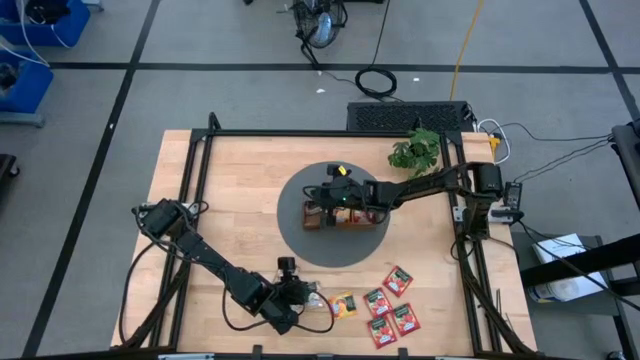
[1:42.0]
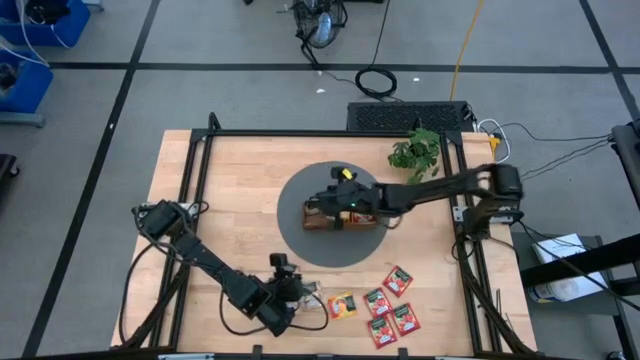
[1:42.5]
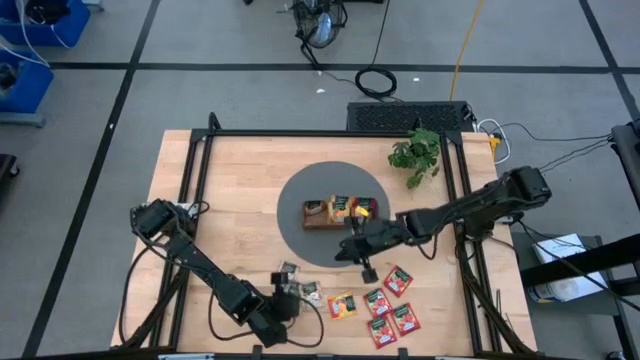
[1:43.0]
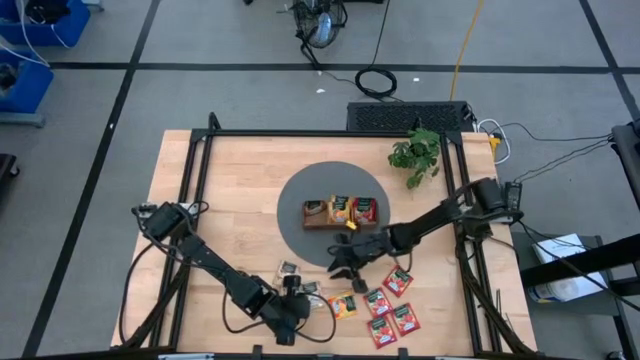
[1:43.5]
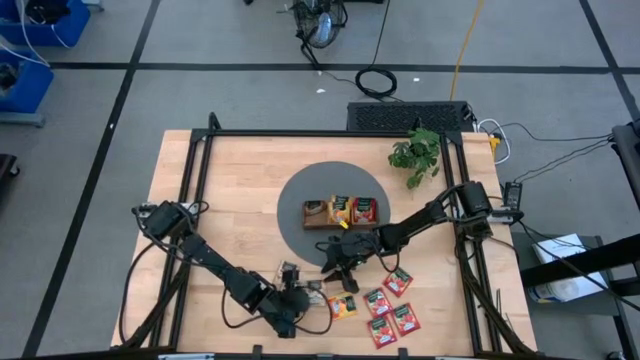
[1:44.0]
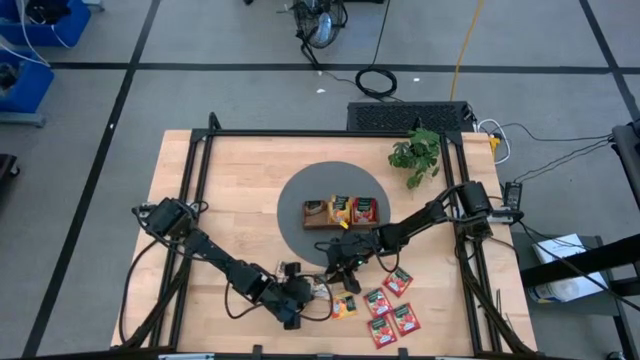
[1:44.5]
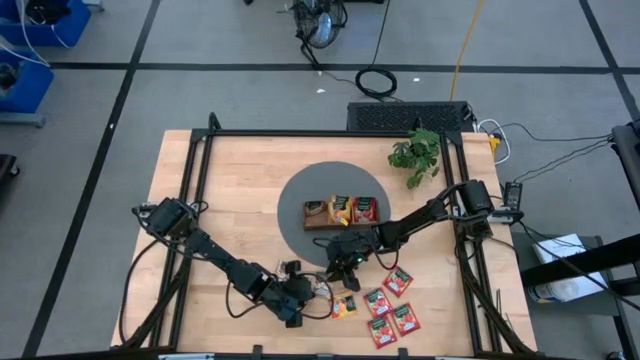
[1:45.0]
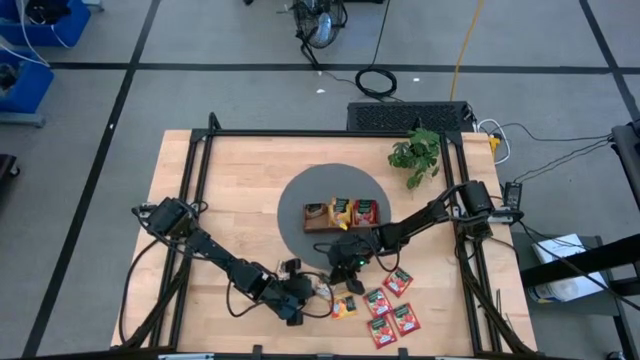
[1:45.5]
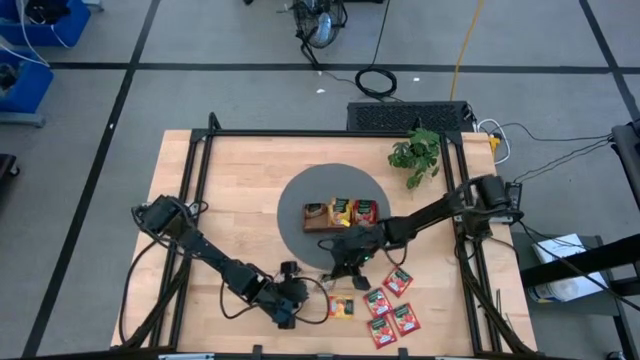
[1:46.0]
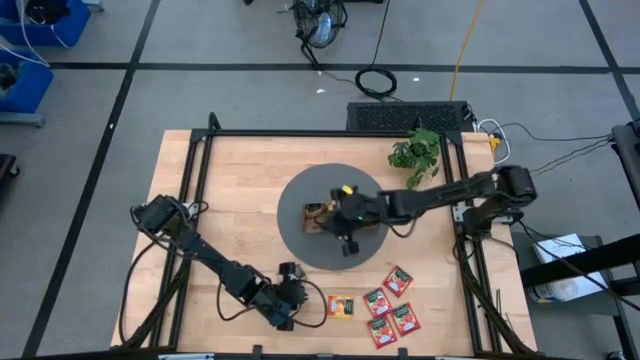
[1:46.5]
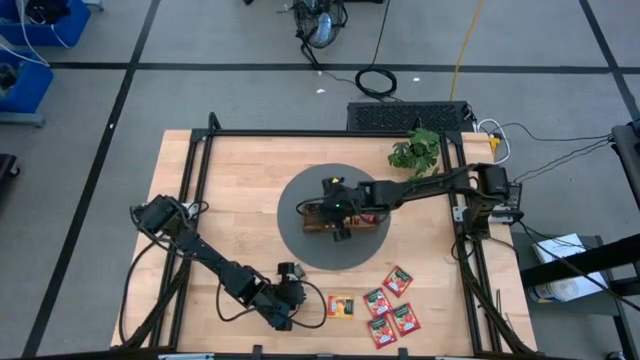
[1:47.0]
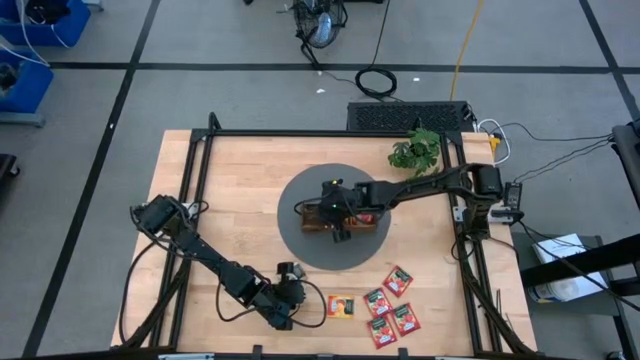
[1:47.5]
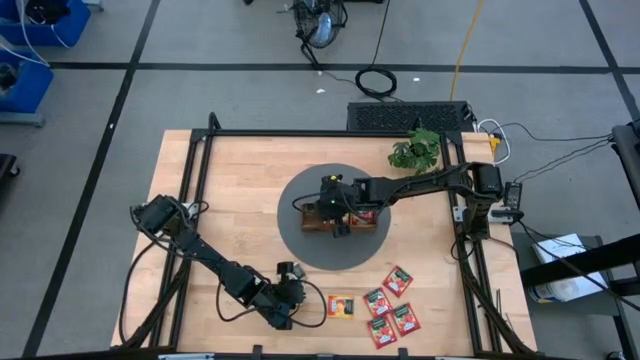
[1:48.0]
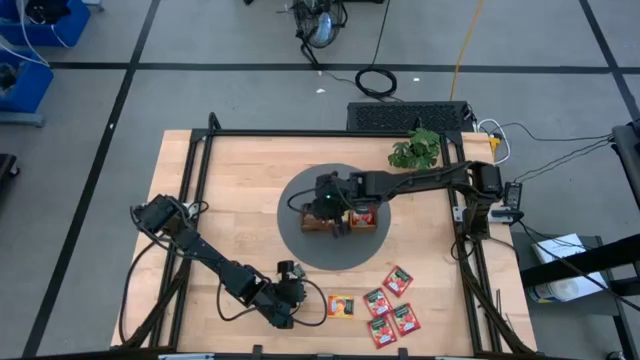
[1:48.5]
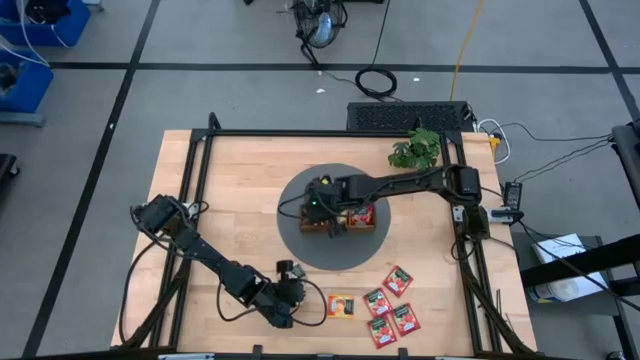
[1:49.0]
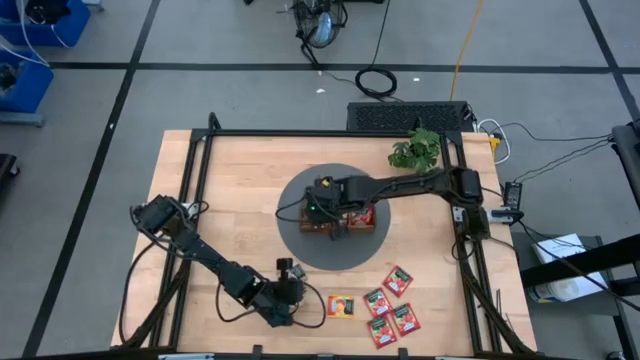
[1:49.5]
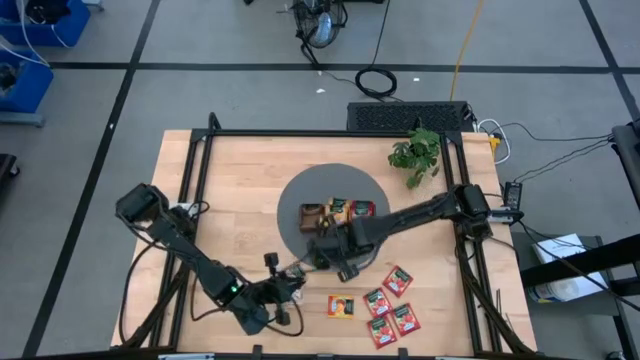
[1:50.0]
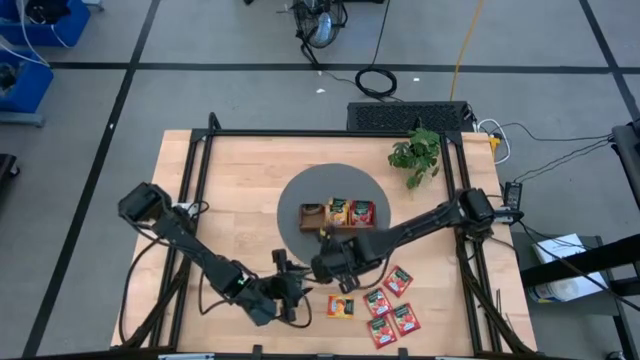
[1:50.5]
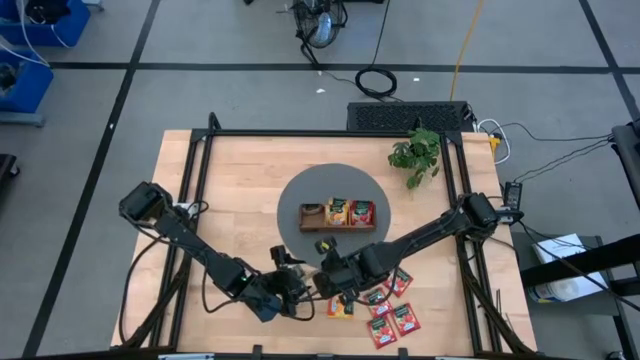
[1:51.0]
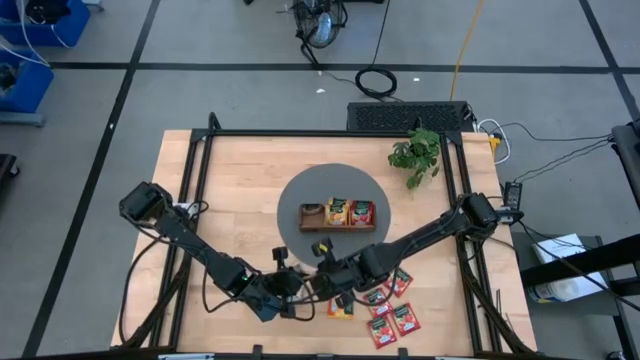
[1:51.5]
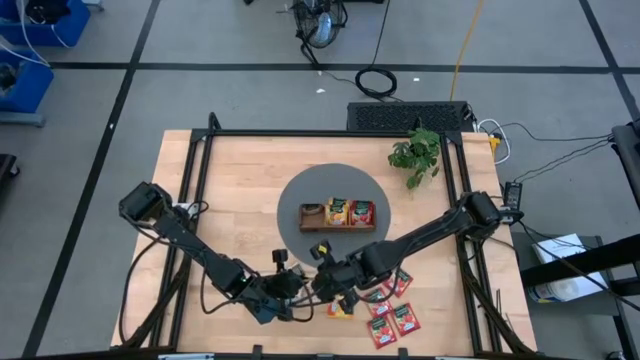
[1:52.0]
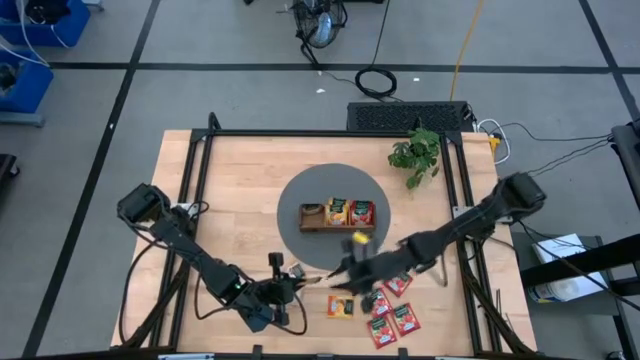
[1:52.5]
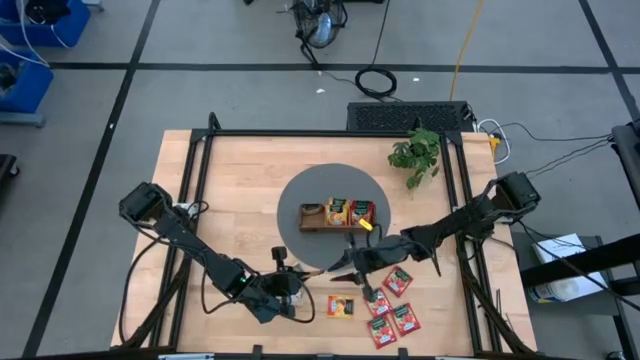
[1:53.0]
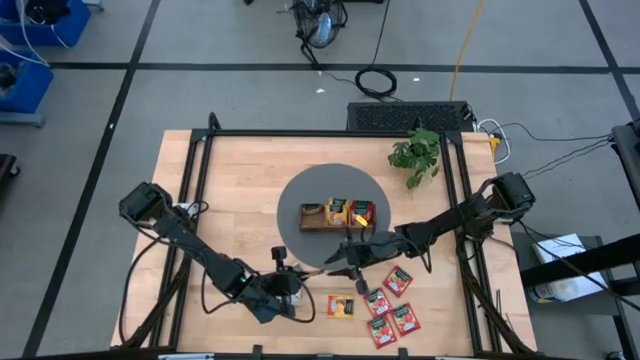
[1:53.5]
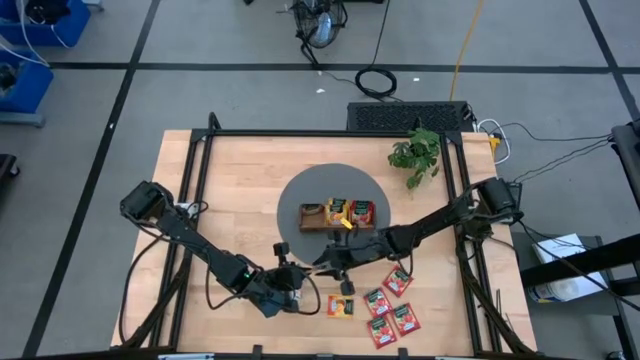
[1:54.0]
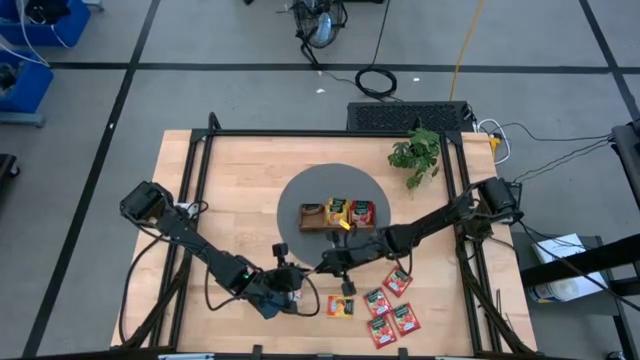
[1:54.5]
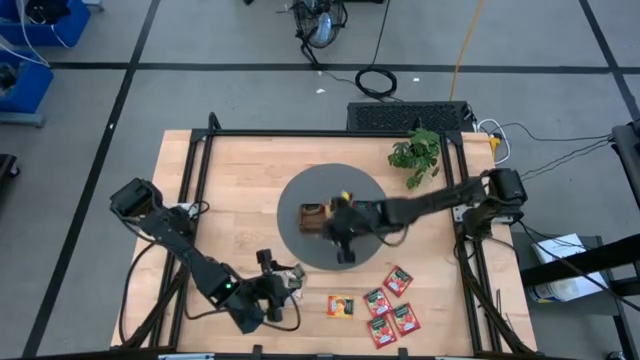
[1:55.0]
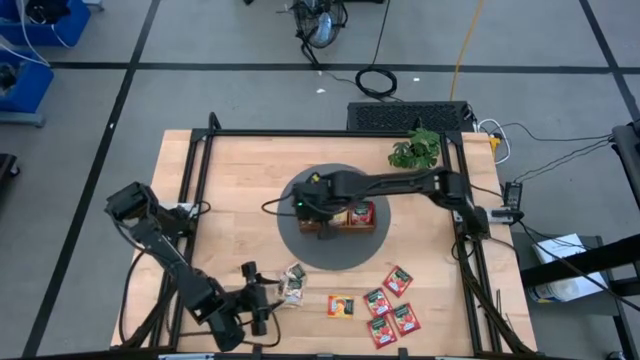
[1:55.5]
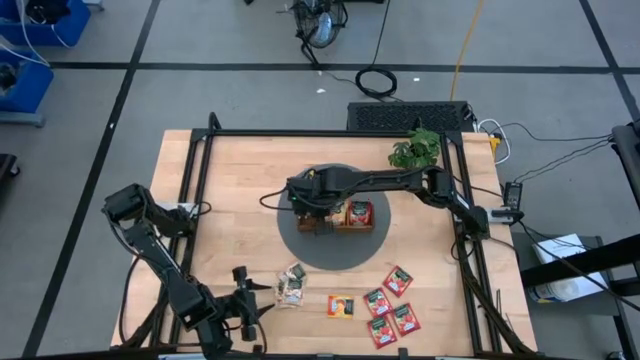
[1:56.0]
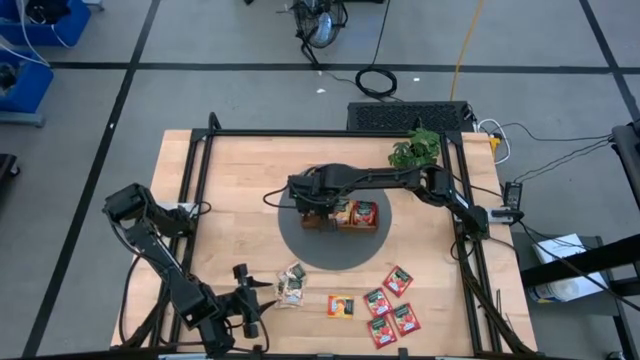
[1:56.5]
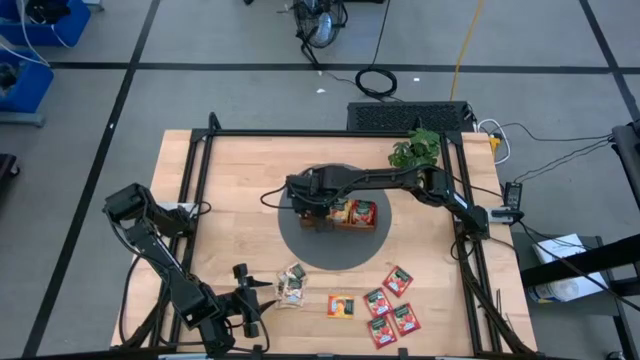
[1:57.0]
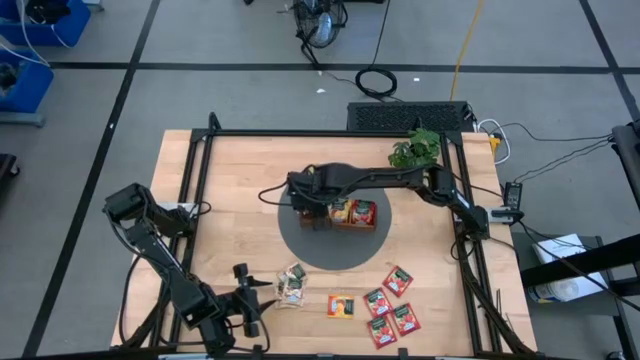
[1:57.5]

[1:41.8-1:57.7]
Task: Pick & Place Tea
Put the gold tea bag into the left compartment of the wooden organizer

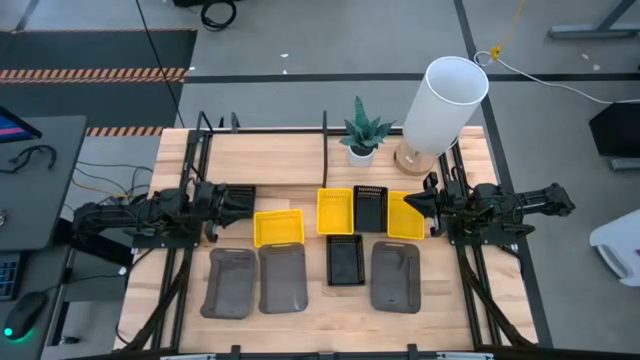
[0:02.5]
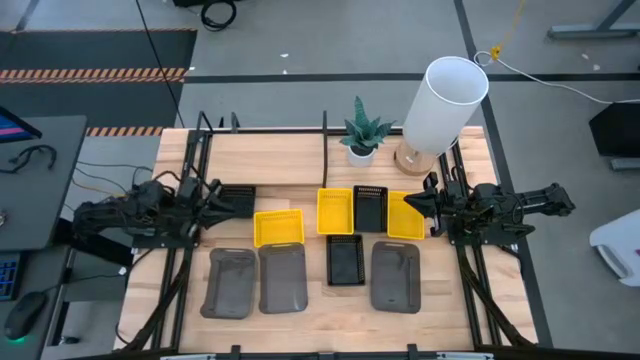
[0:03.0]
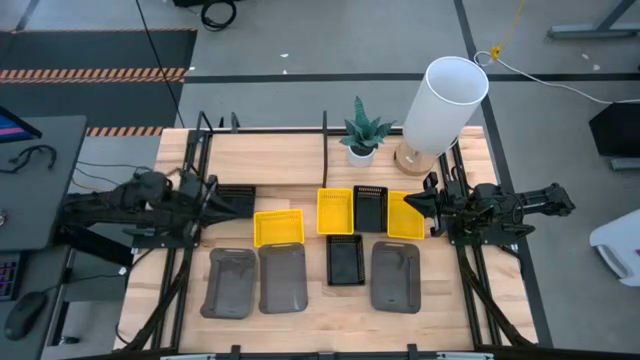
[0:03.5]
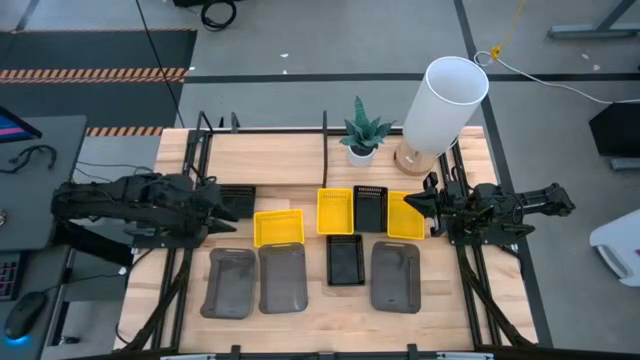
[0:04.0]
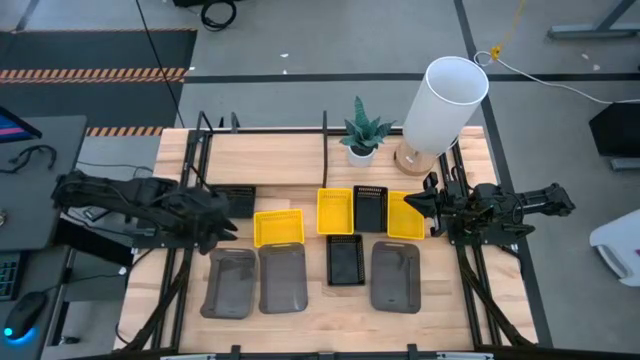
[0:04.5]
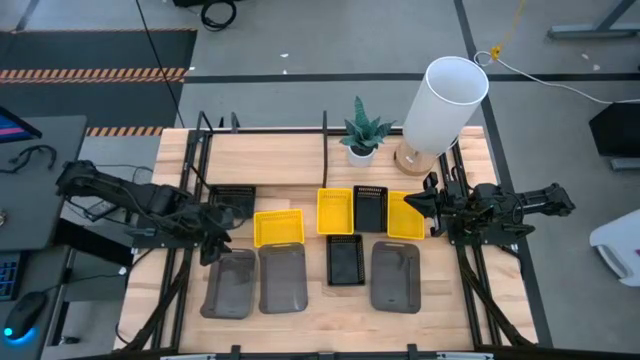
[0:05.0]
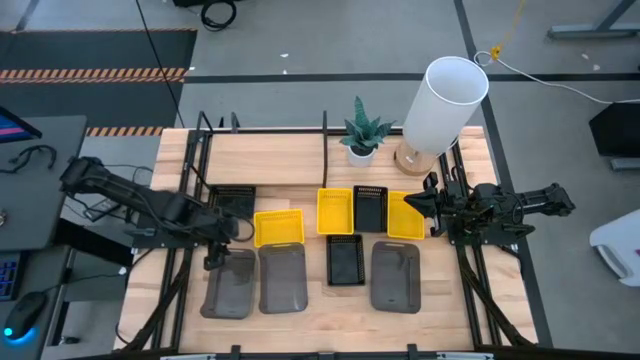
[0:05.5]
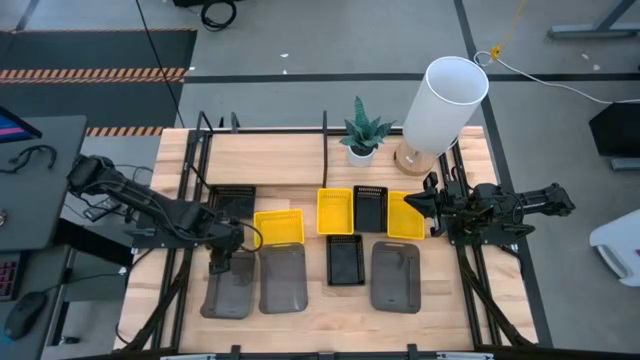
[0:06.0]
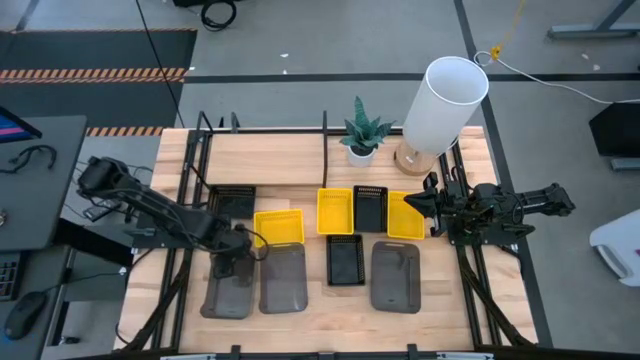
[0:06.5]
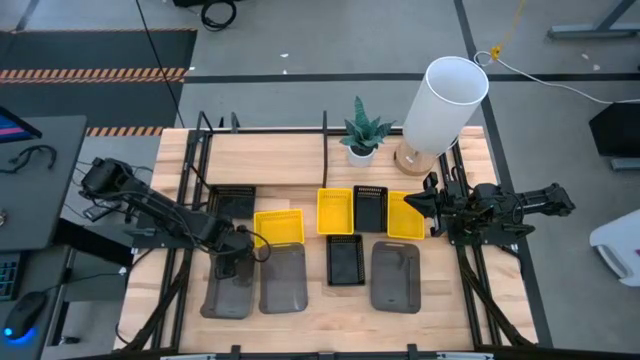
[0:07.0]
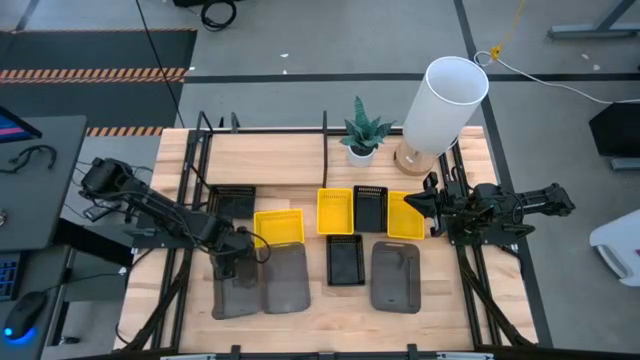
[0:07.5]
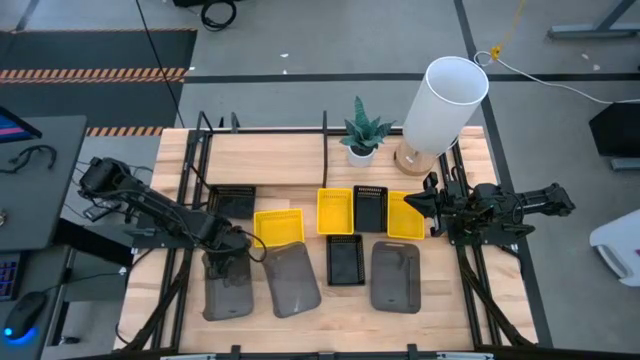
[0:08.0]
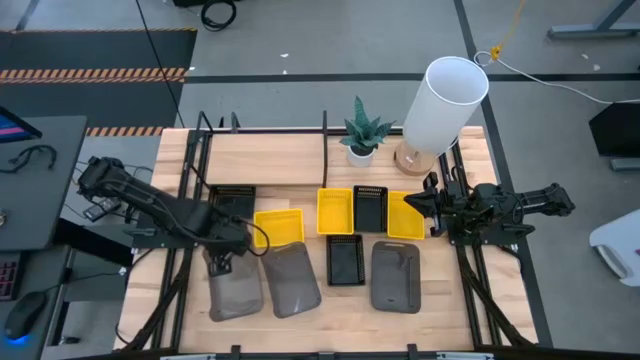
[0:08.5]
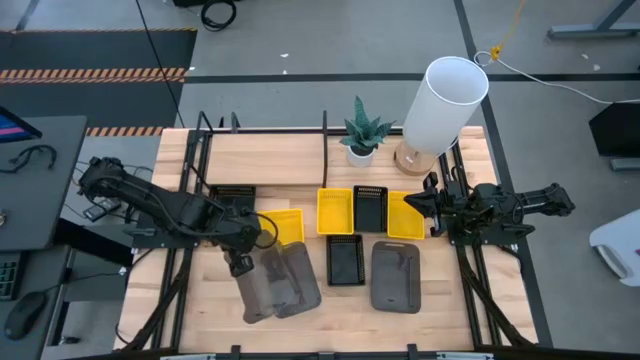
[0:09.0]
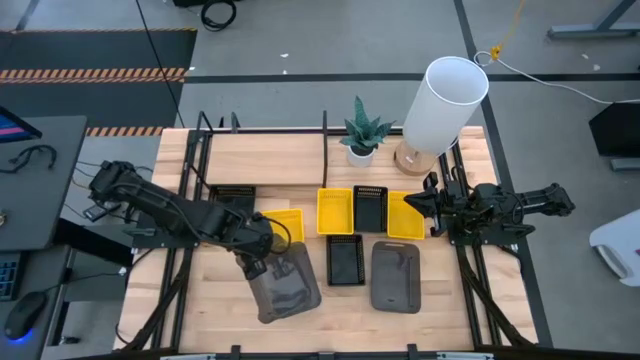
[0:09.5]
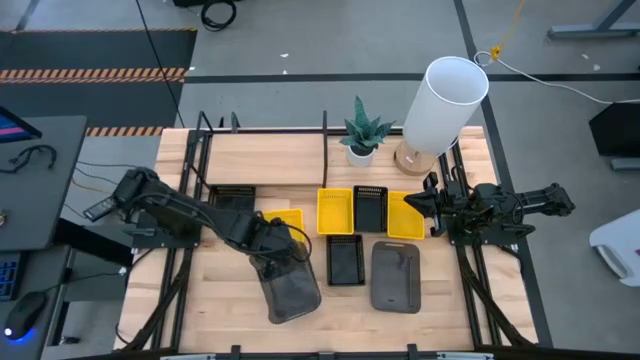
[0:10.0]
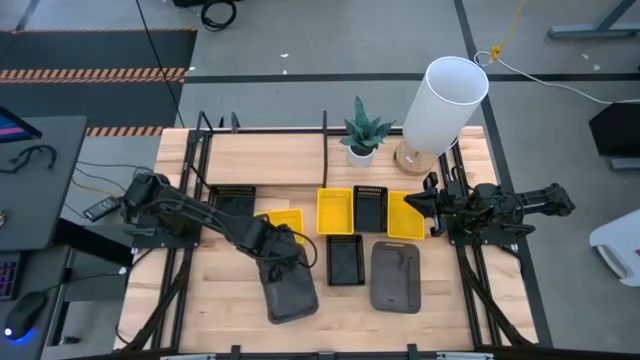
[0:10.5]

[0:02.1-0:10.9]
Task: Stack baskets on shelf by color
Stack the left transparent black bin on the middle transparent black bin
